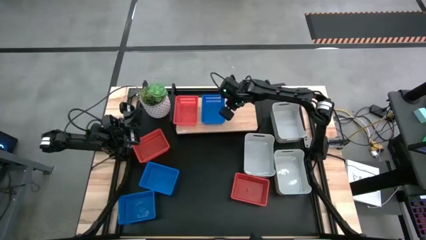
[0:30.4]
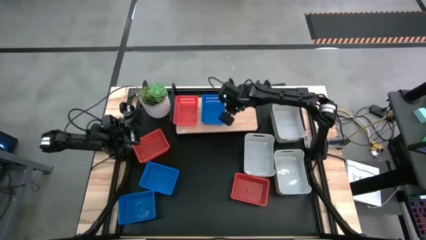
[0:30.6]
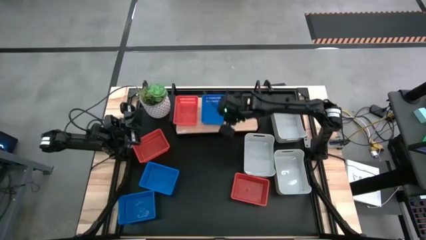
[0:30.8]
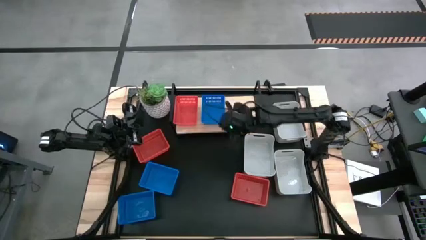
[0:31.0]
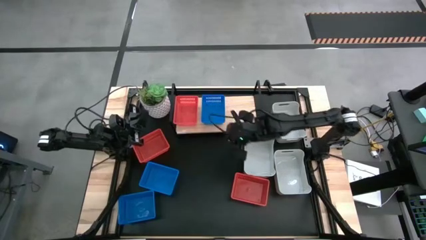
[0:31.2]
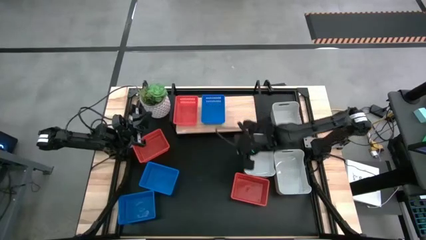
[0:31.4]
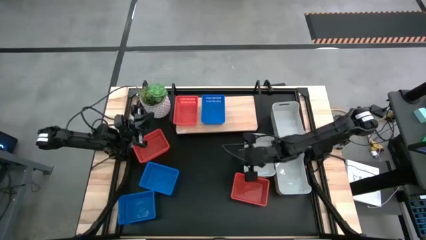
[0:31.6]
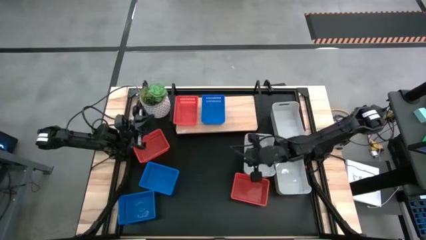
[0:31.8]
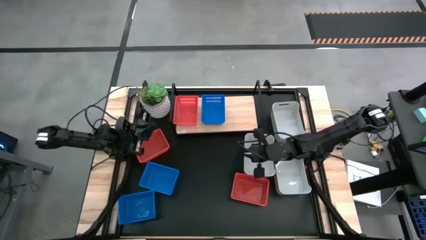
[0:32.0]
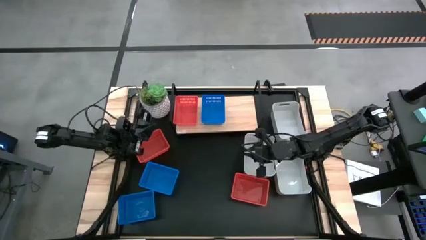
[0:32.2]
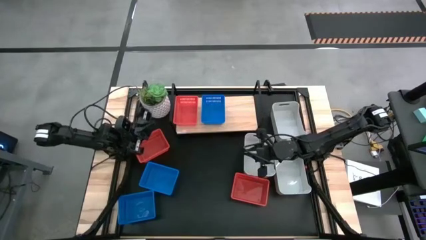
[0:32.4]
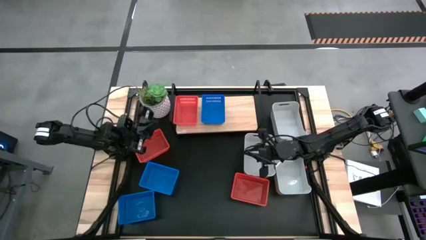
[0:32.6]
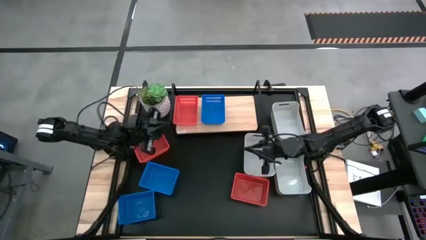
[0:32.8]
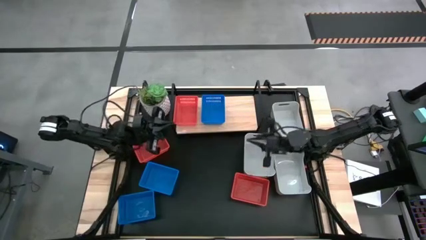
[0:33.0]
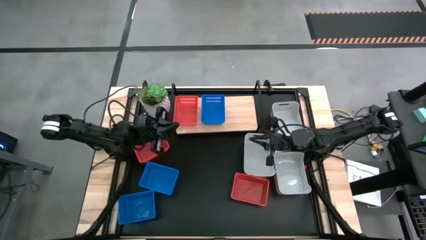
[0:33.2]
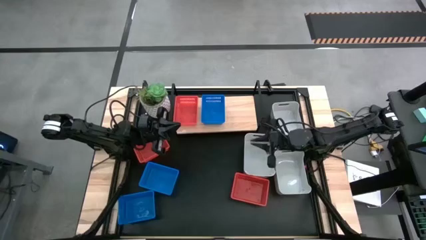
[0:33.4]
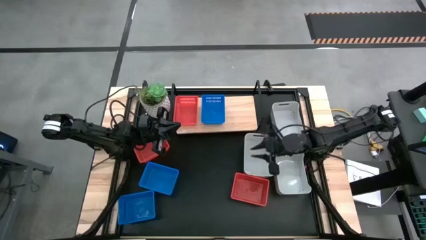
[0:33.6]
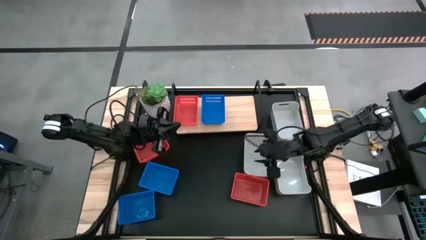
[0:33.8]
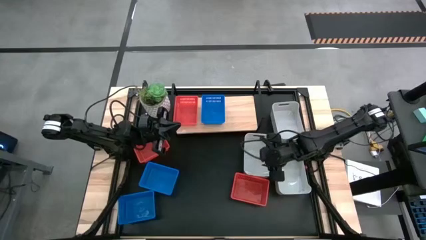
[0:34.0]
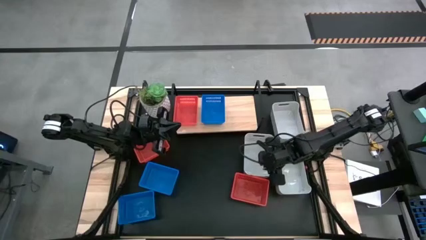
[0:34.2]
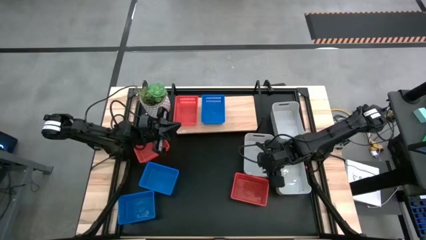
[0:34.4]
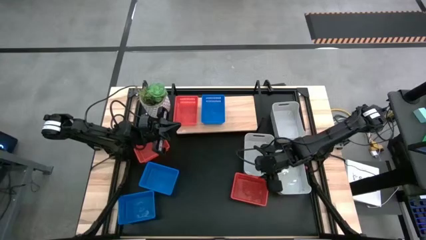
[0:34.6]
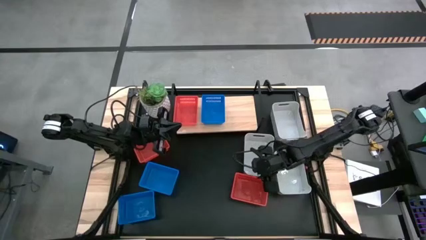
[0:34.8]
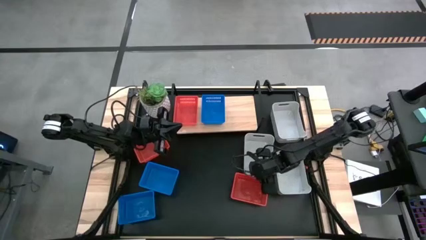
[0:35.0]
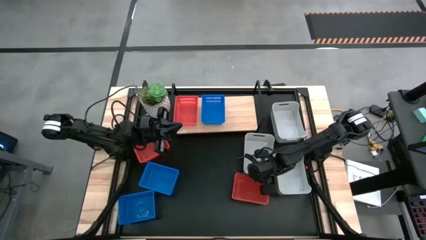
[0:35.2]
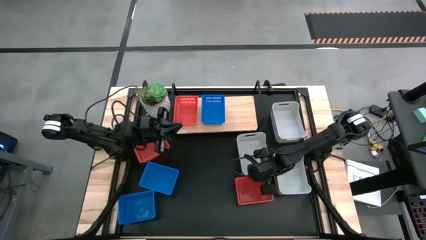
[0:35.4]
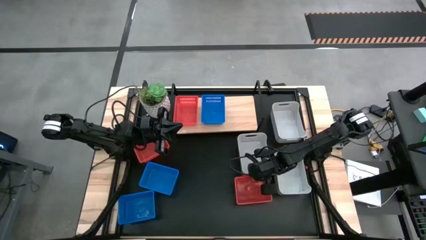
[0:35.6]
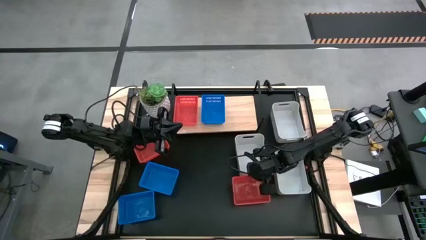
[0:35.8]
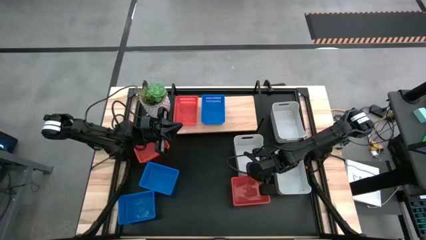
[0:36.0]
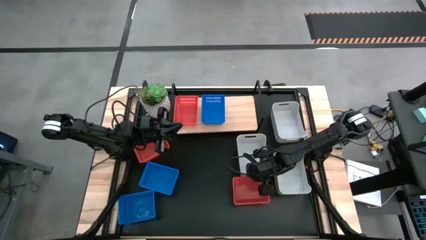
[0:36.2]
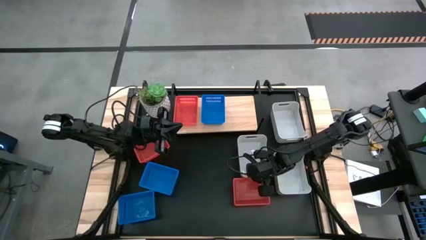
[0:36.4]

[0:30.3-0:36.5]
Put the bottom left white bin on the shelf

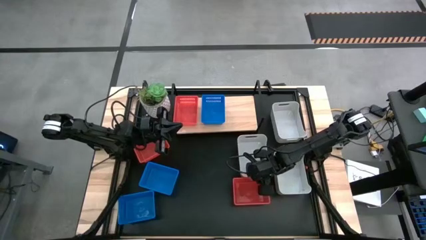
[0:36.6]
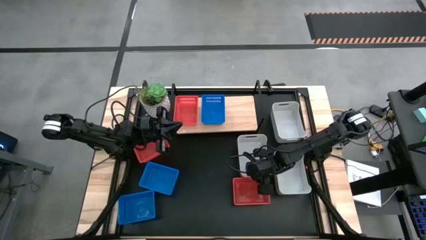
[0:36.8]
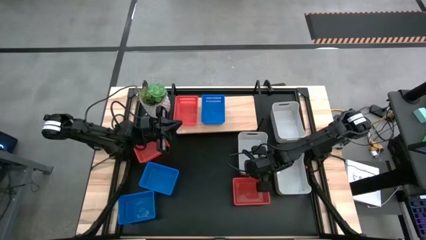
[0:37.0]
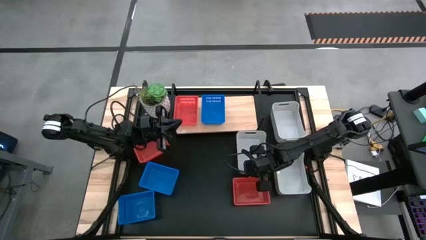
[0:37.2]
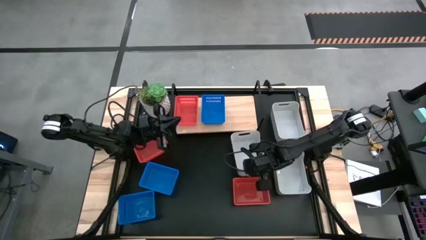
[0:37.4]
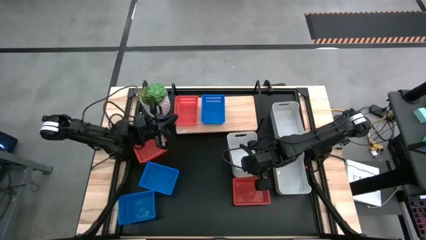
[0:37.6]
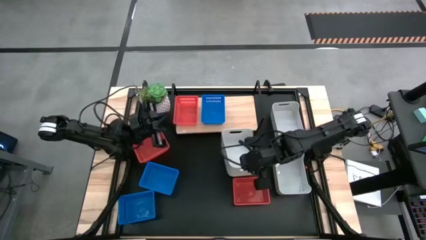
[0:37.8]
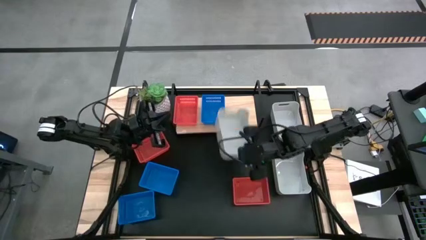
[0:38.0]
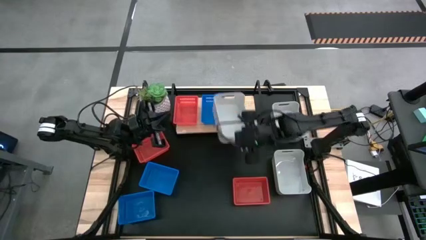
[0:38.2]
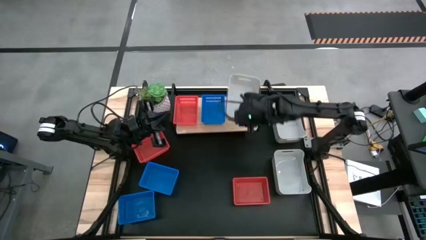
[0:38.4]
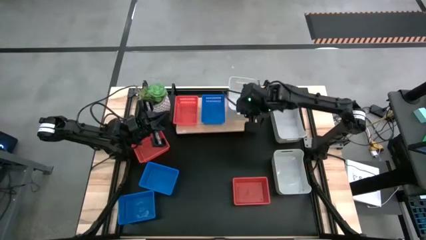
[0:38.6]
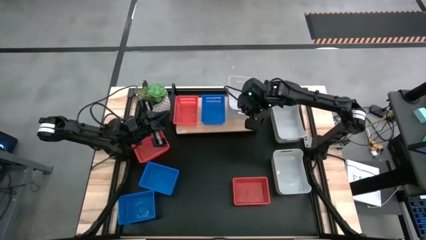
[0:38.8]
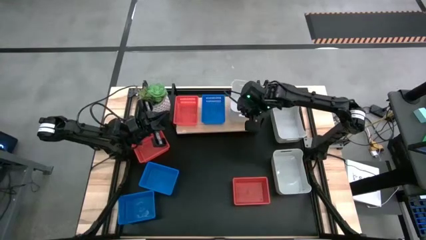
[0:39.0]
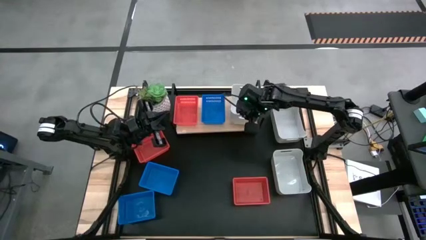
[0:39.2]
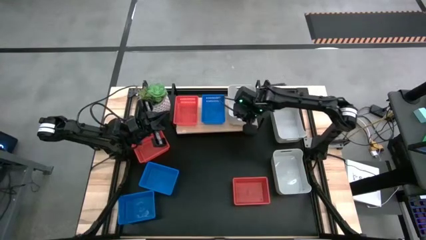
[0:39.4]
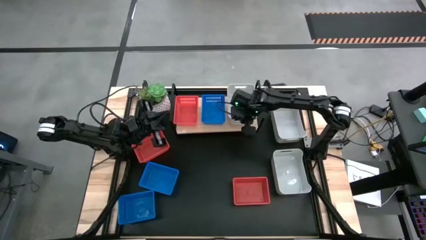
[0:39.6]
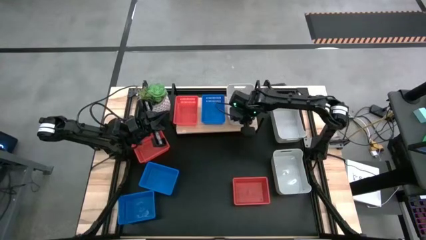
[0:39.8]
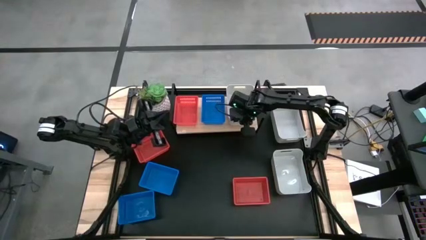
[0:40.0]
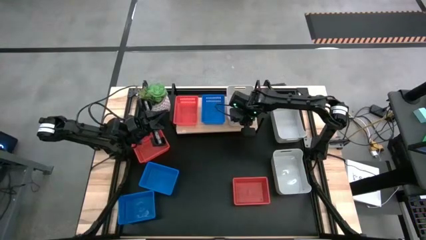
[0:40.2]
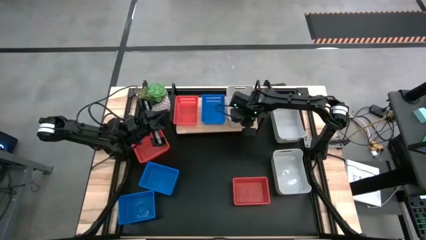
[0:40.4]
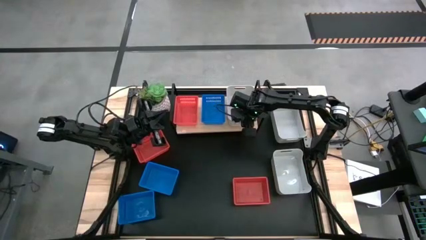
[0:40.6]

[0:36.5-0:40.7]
Put the bottom left white bin on the shelf

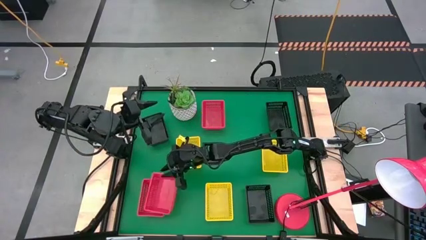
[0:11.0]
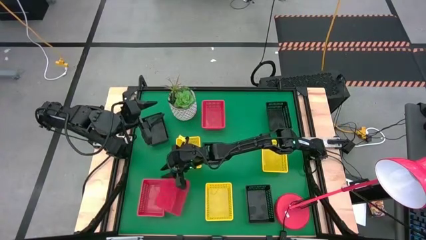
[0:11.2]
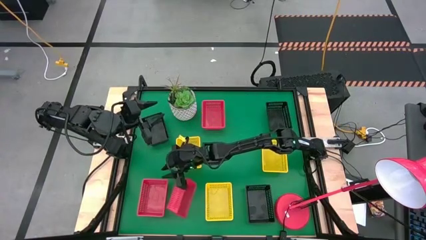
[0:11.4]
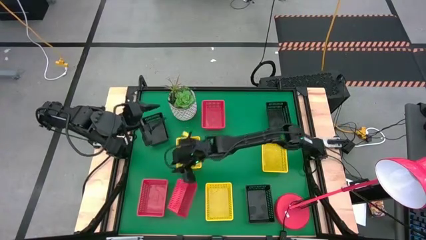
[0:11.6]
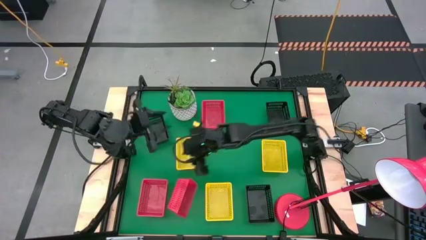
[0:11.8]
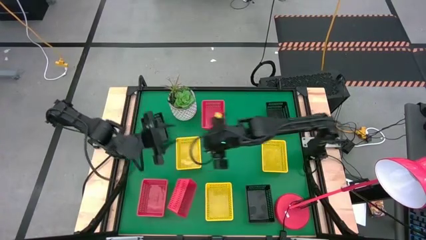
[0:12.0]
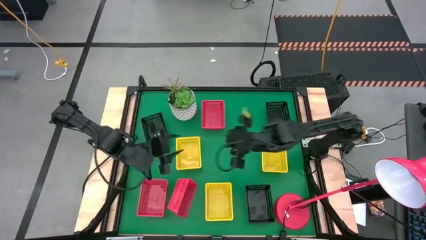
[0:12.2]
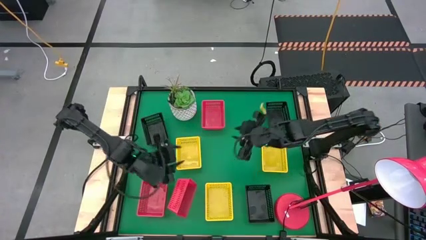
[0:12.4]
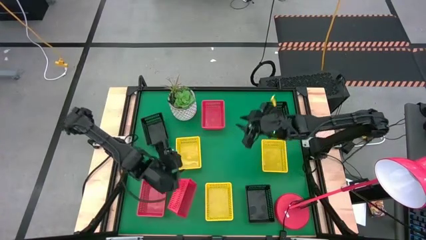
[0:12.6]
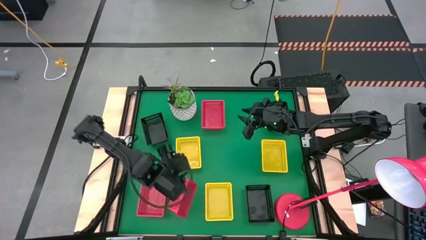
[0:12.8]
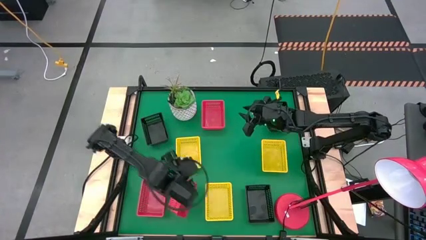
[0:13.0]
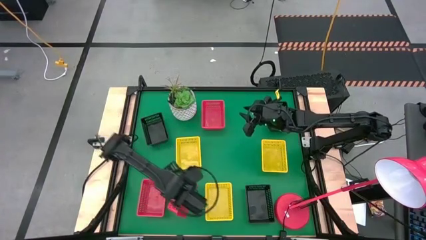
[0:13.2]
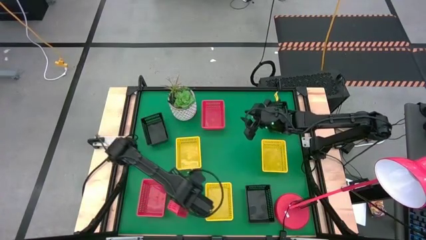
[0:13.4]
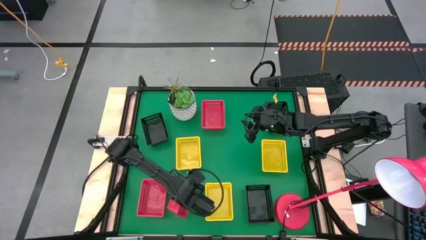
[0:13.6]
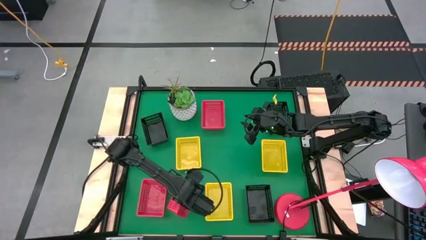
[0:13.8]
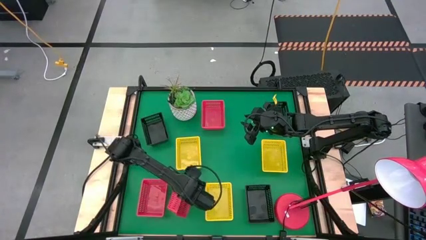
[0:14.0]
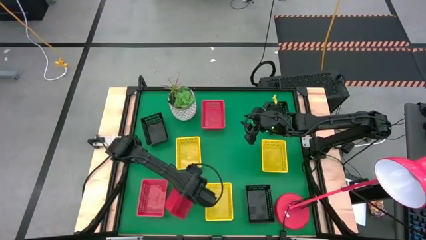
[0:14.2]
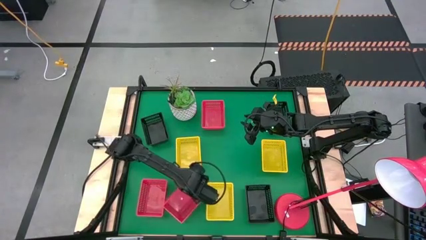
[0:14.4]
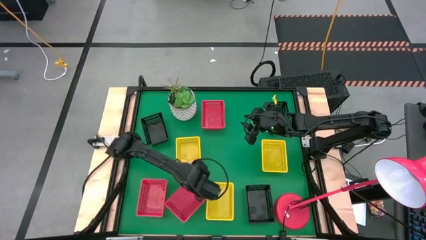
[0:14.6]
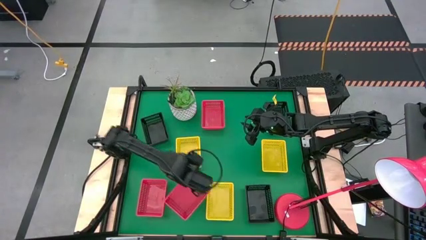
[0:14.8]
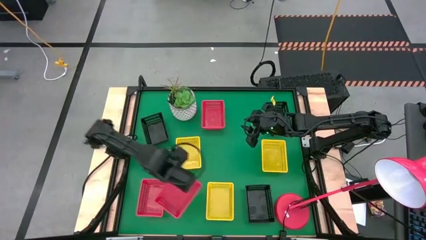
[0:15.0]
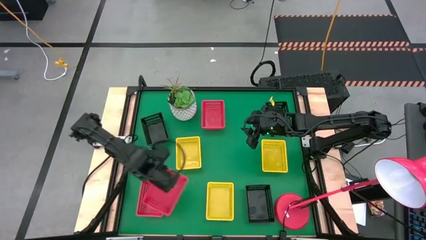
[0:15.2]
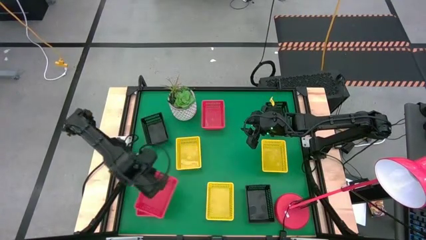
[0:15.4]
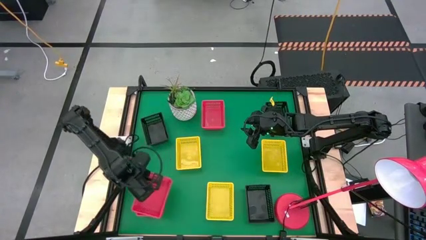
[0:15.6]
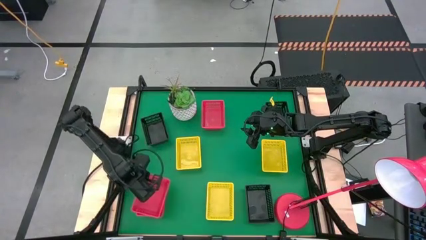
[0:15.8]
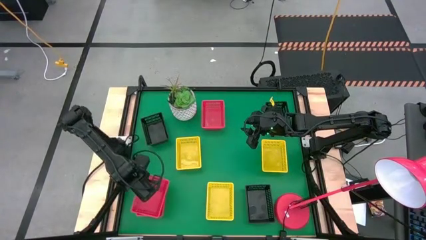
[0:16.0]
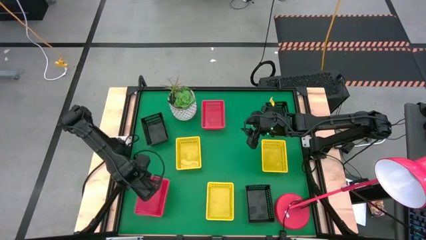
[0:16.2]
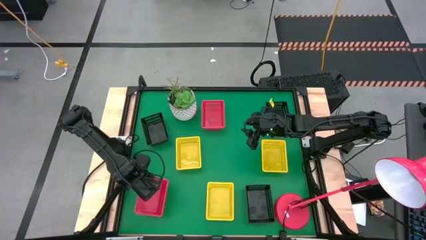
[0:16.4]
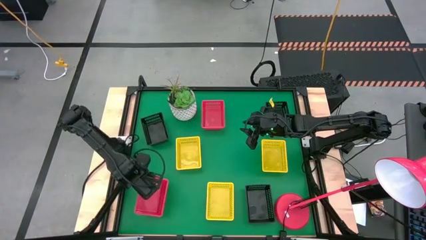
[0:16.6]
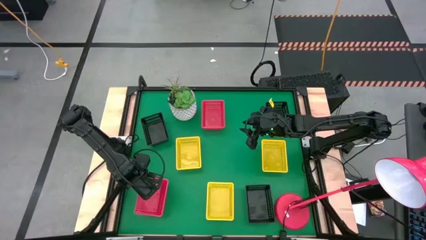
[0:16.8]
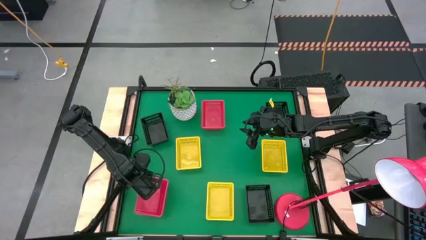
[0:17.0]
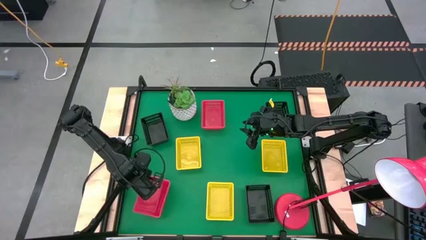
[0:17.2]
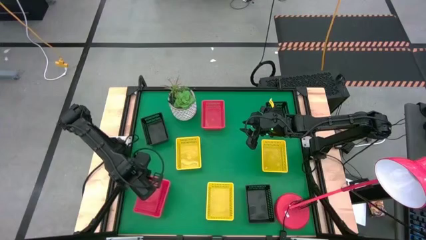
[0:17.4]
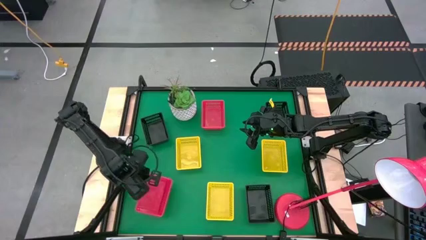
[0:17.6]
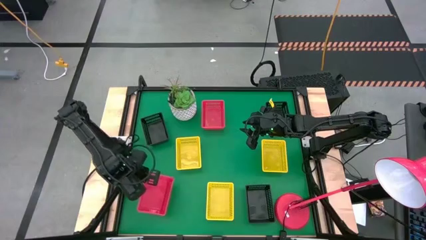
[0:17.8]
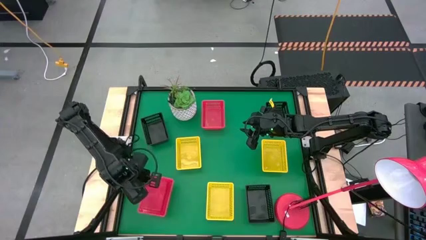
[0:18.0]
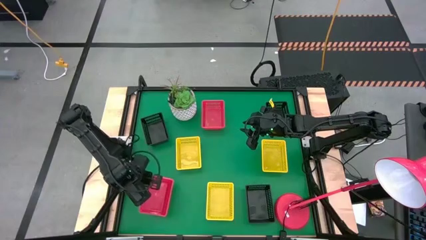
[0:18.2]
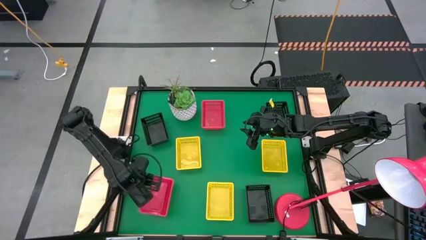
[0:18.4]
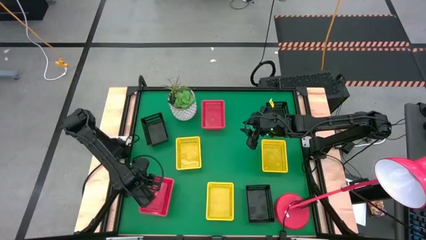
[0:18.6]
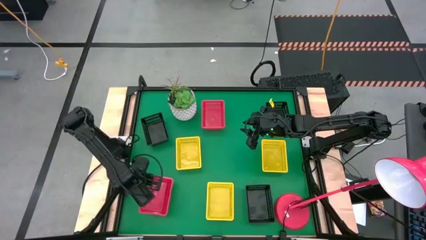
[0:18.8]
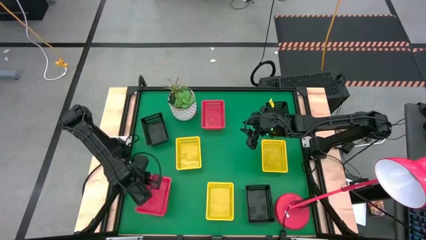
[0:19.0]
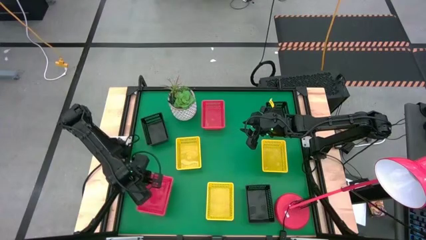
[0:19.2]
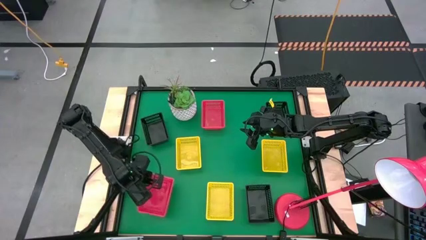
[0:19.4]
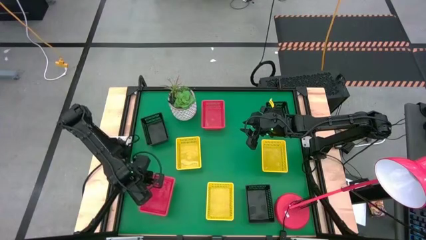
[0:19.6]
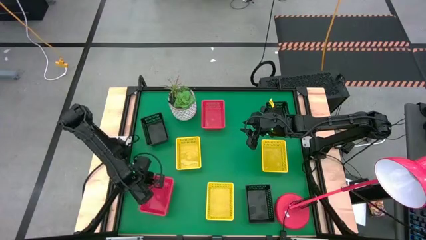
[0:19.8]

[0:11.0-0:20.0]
Stack the middle right red bin on top of the bottom left red bin
